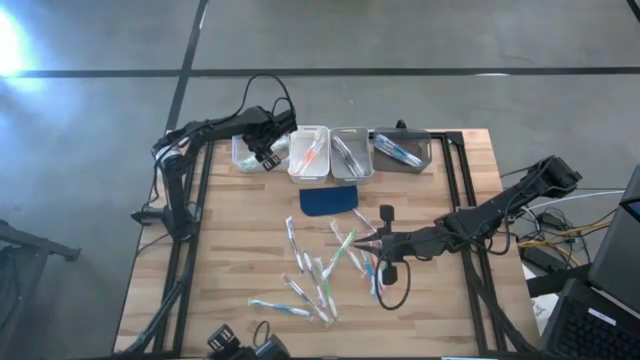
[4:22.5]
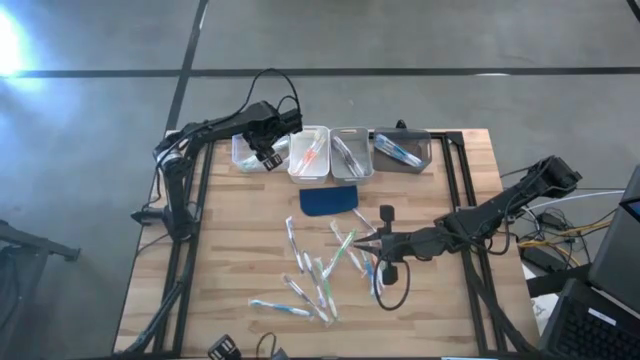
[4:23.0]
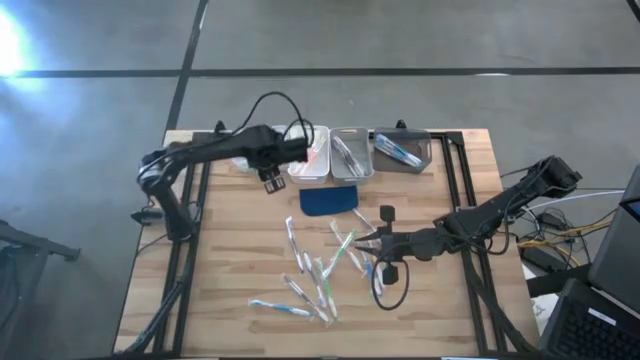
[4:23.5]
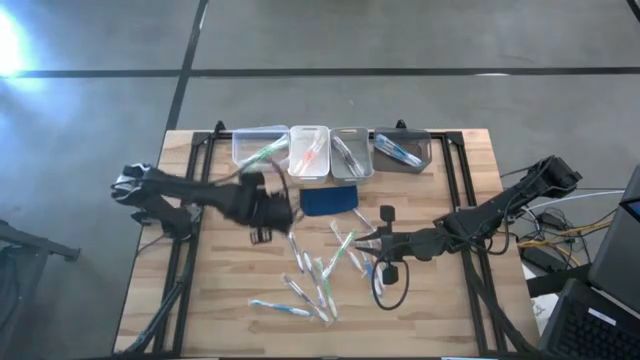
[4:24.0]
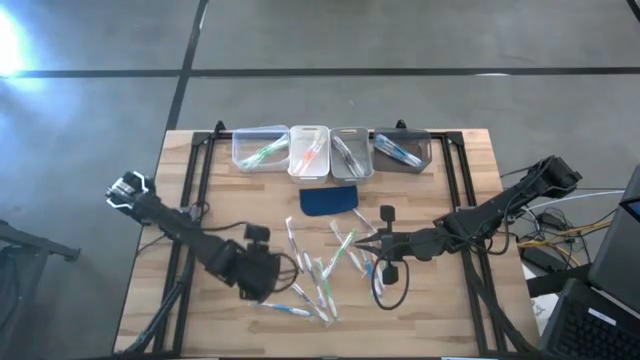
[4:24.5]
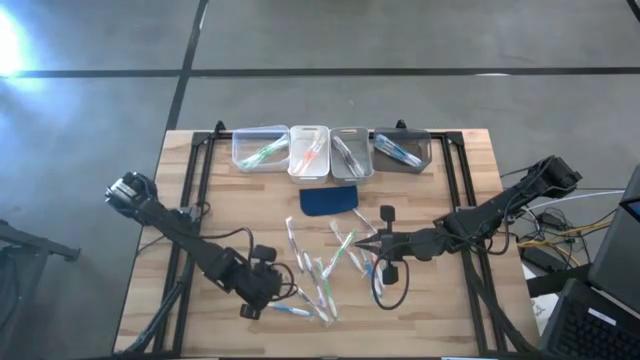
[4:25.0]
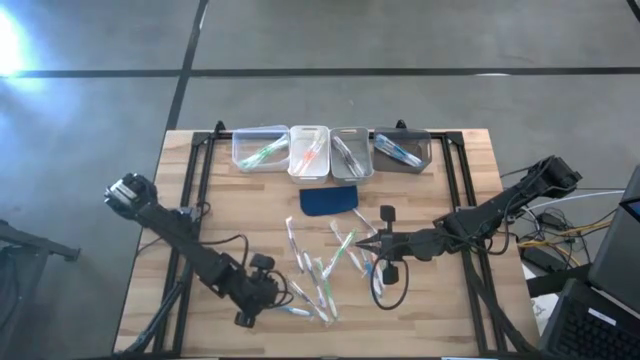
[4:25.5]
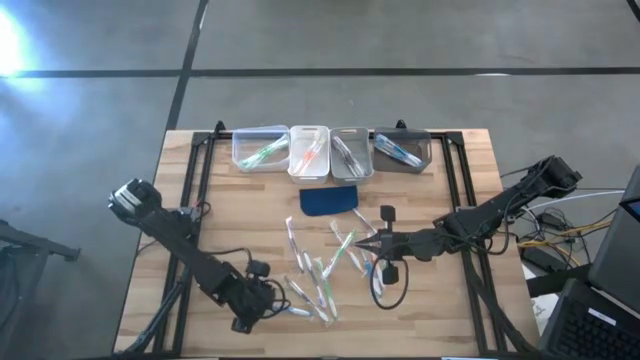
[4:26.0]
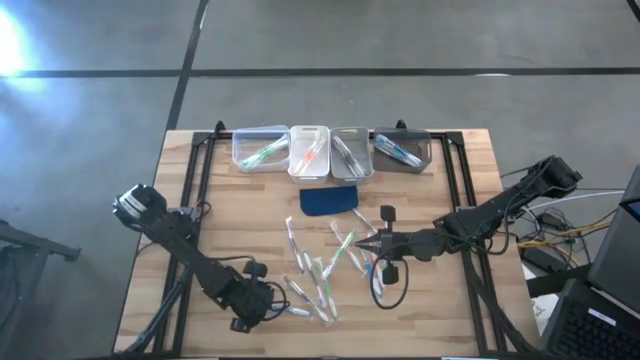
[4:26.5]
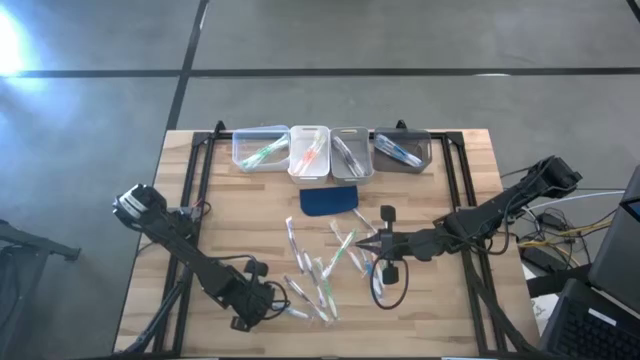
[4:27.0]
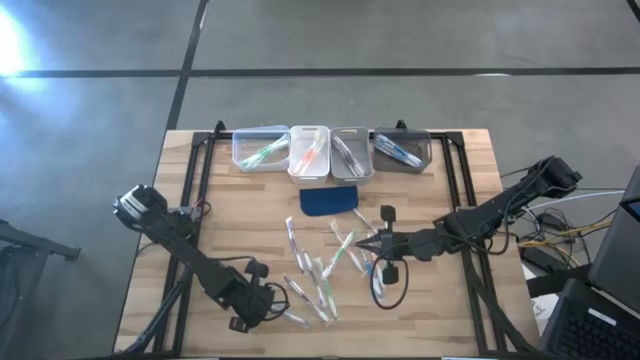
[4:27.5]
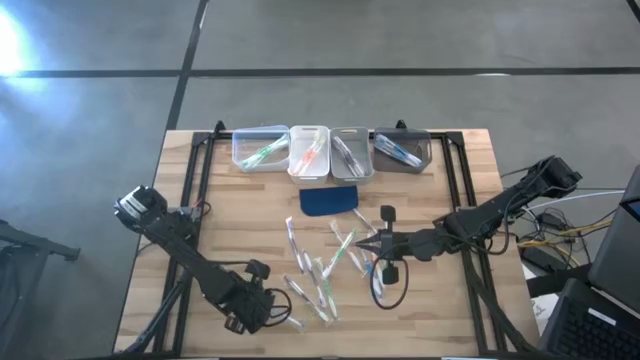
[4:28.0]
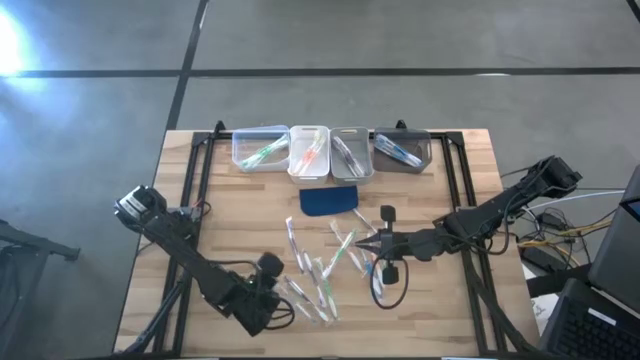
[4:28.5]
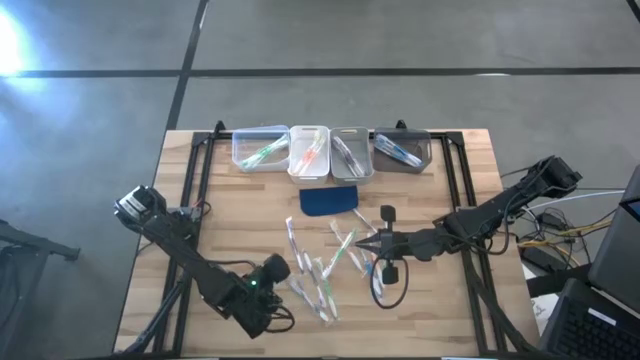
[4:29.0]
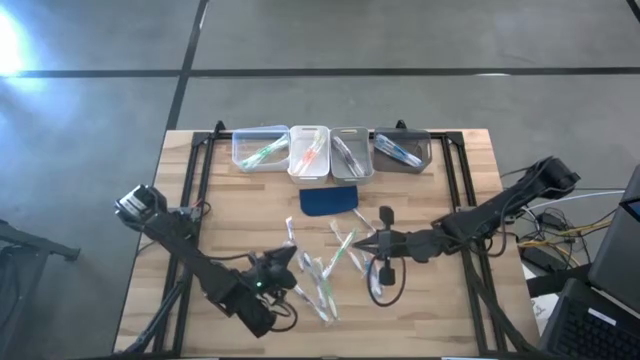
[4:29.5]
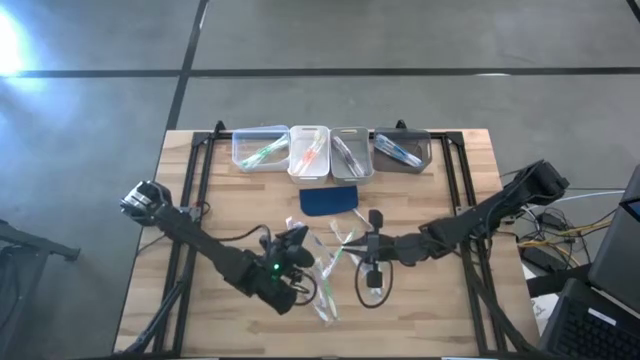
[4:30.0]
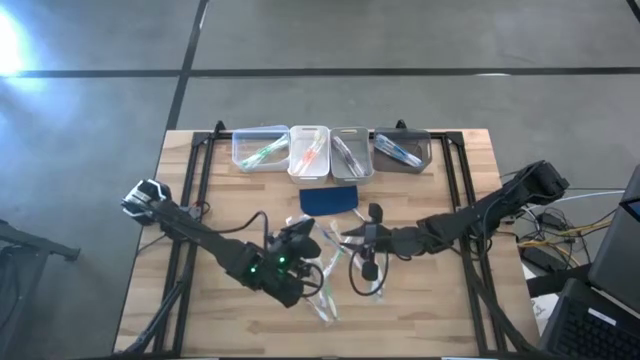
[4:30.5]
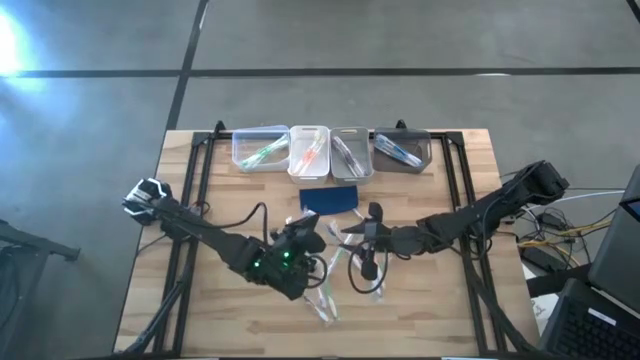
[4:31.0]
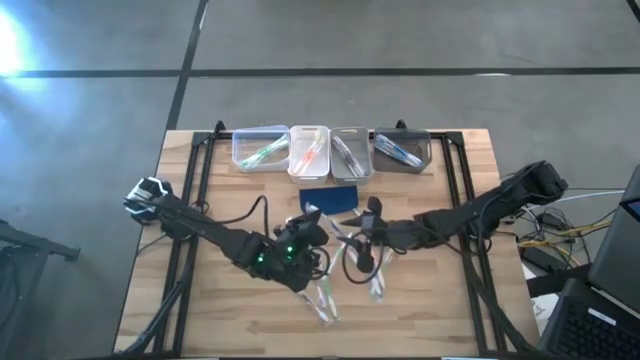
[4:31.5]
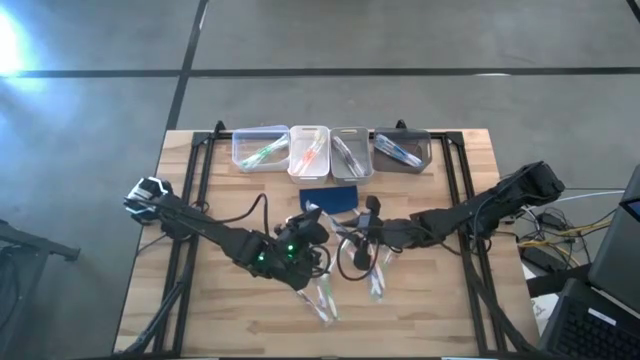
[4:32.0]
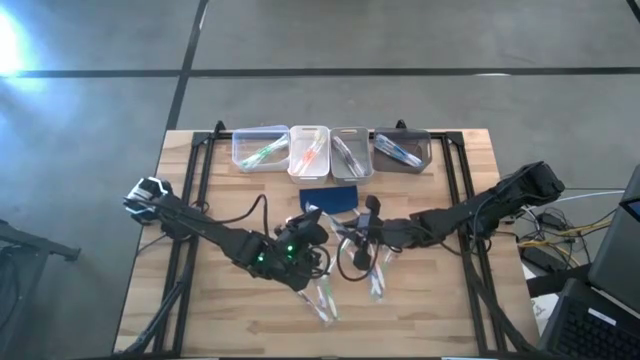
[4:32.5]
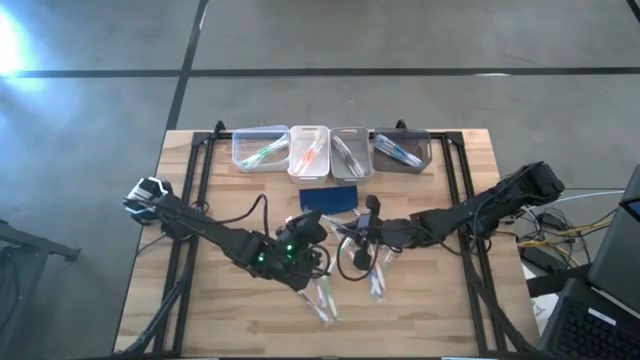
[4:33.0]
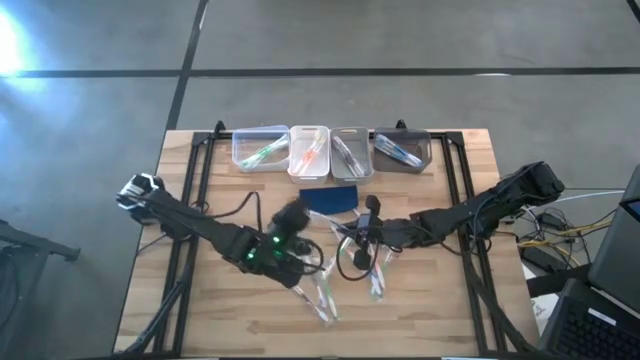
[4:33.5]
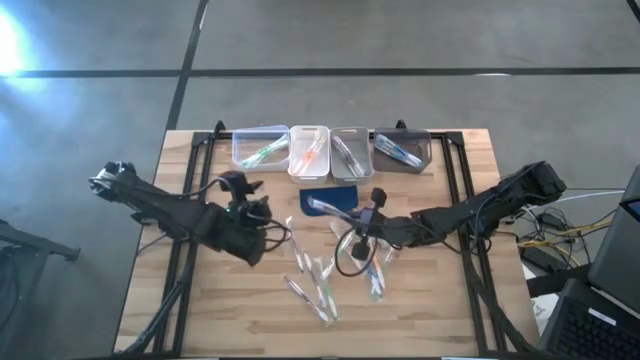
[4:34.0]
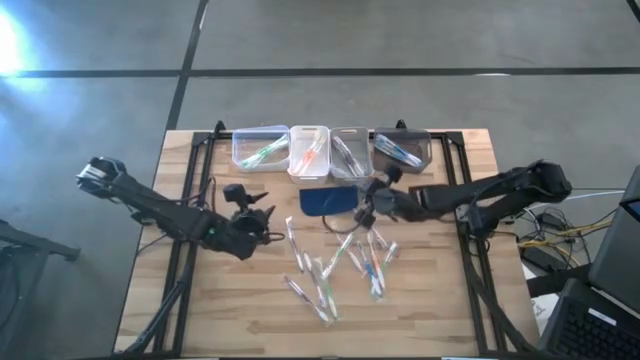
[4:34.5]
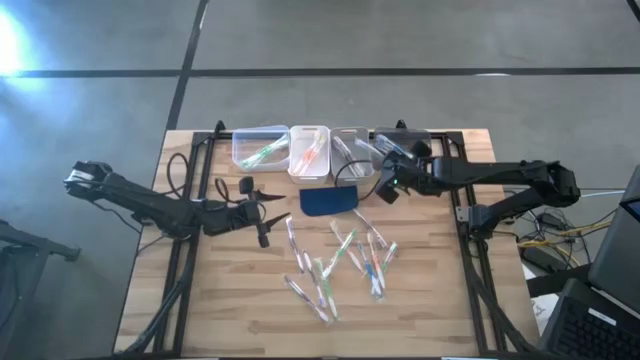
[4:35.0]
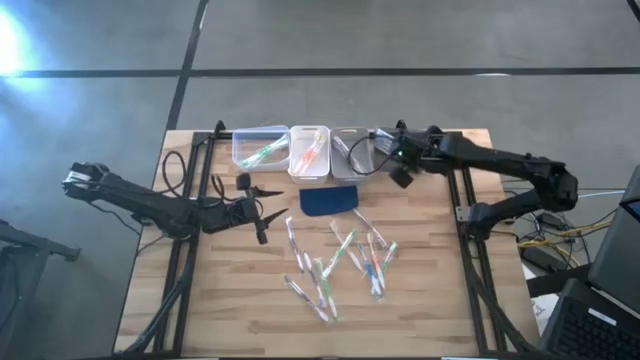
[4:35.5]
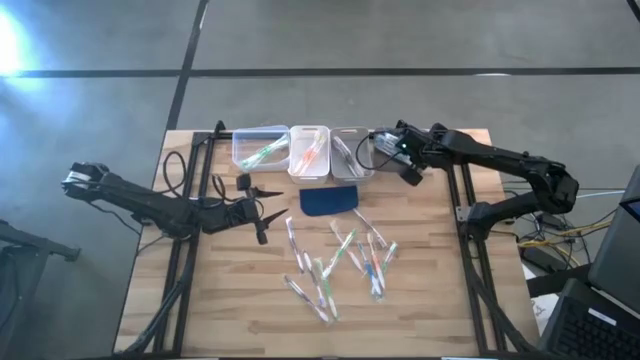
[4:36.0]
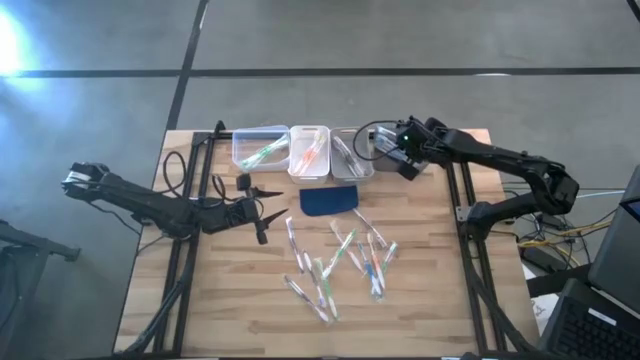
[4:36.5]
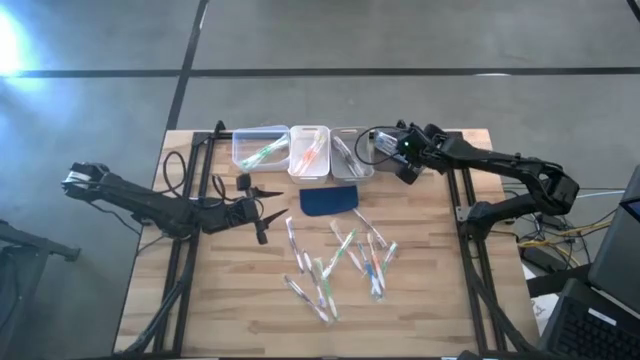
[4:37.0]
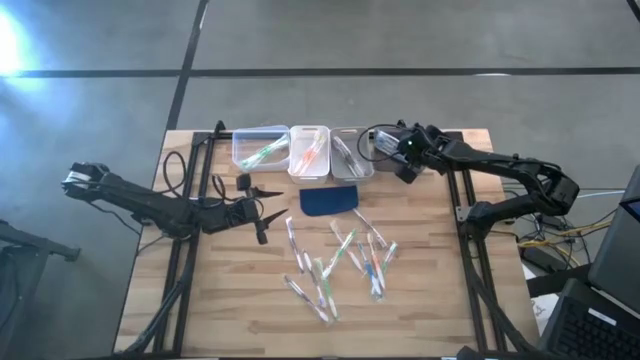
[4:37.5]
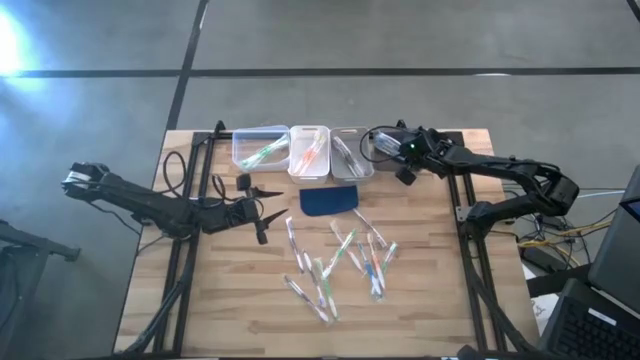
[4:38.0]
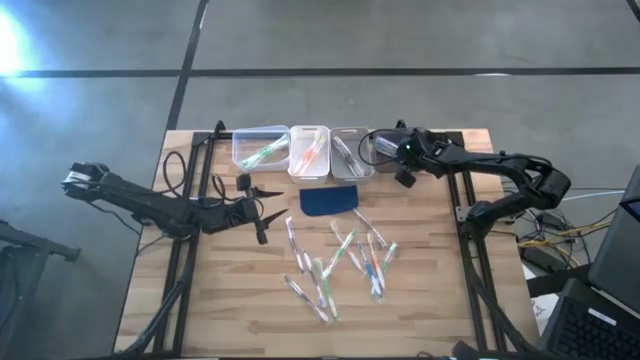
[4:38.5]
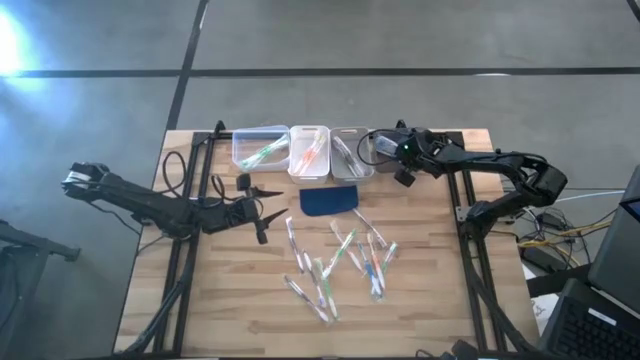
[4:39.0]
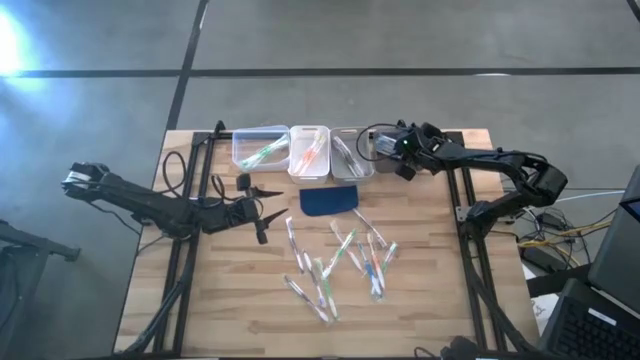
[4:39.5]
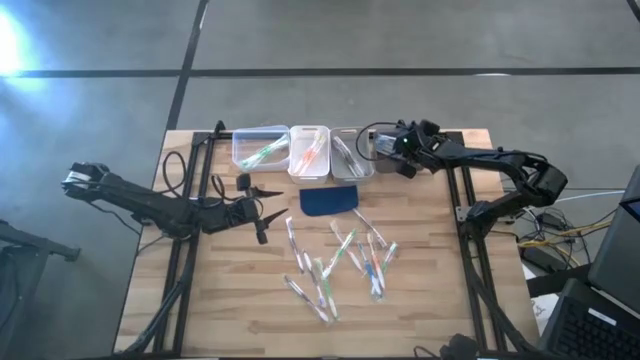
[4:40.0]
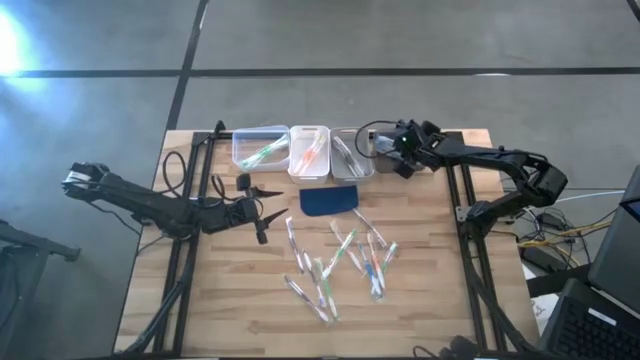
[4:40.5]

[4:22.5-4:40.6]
Task: Pick & Place Toothbrushes
Put the blue toothbrush into the transparent black bin

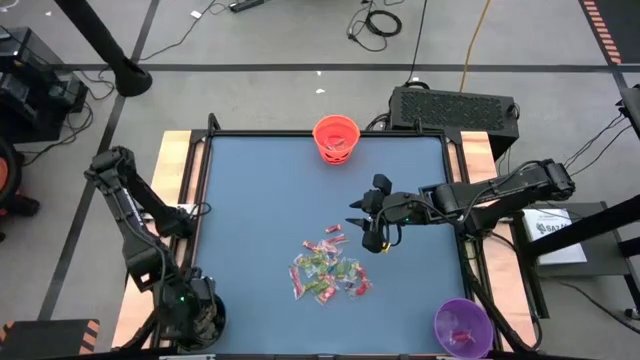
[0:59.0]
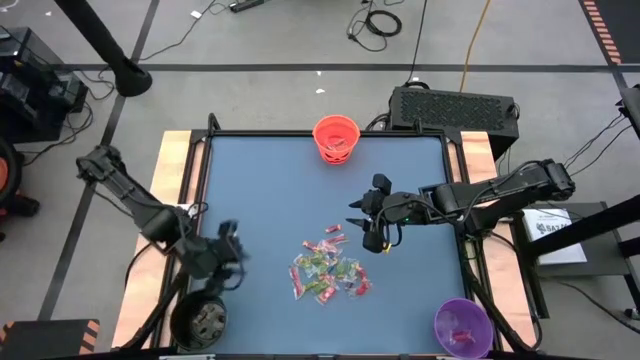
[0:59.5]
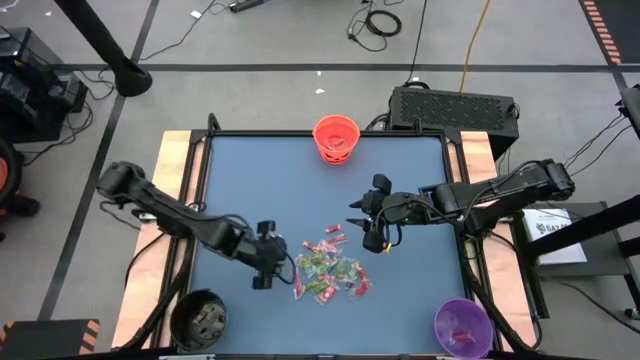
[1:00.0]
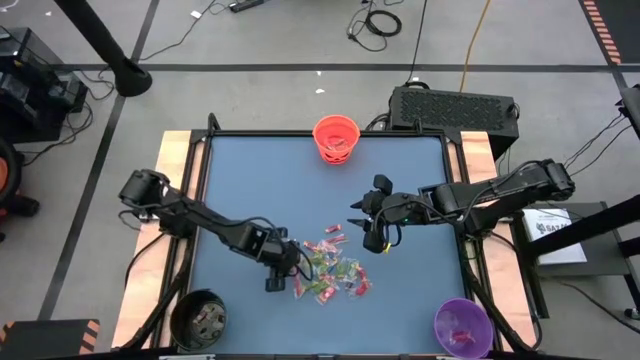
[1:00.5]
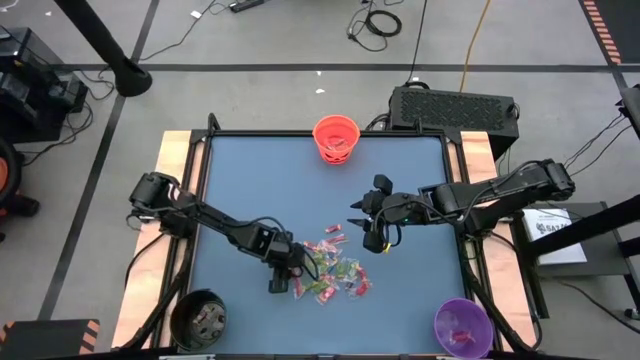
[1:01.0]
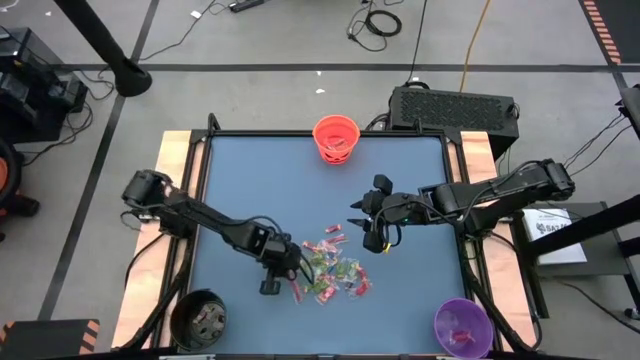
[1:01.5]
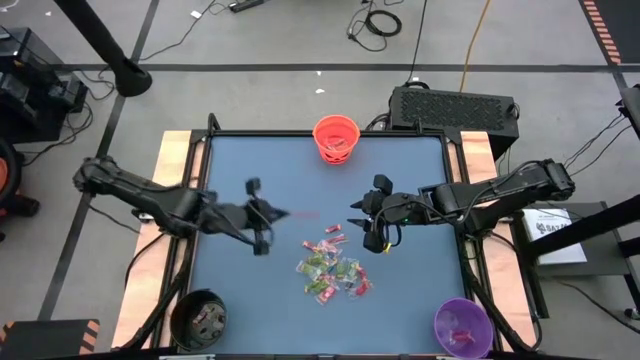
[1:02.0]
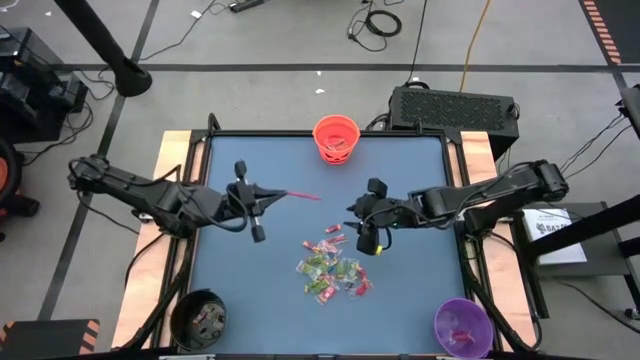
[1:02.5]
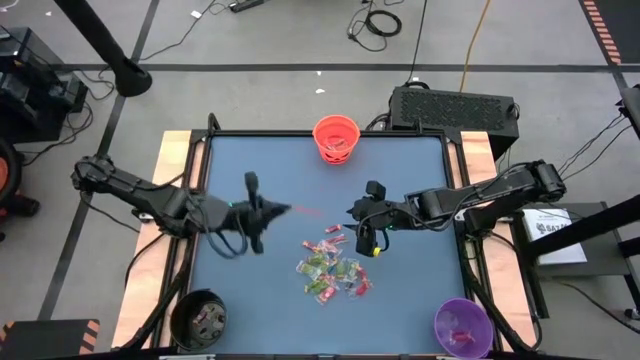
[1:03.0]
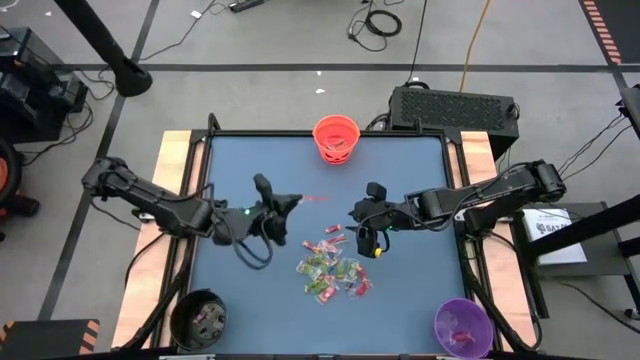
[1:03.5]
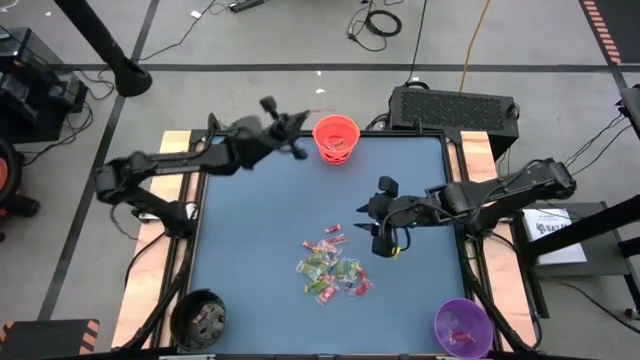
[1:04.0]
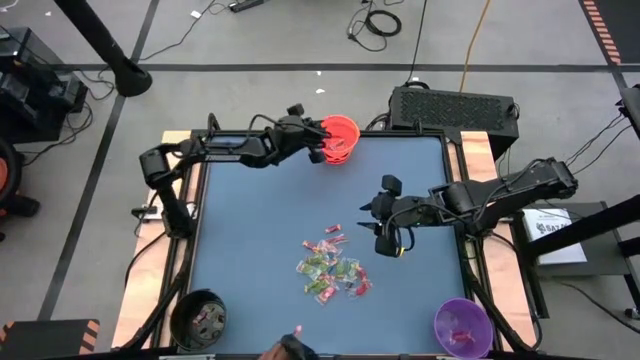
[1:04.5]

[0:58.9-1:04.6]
Task: Sort candy by brand, put in halloween buckets
Put the long orange gummy into the orange bucket
